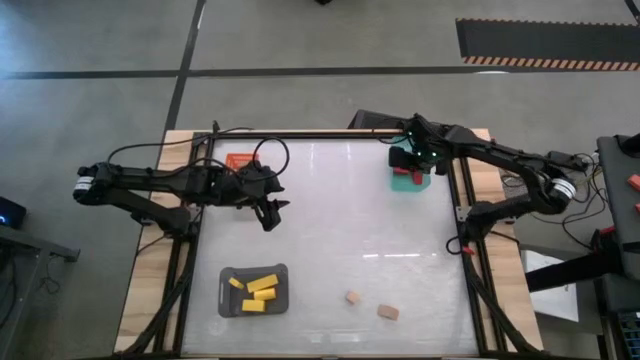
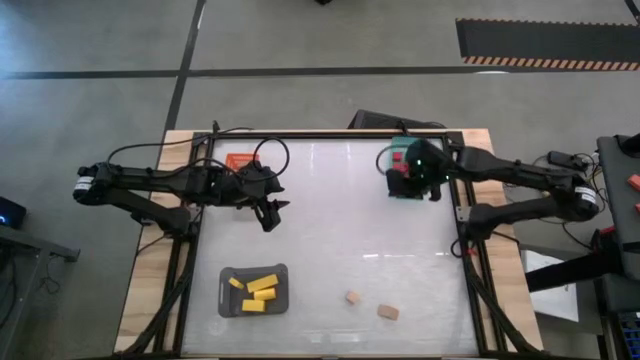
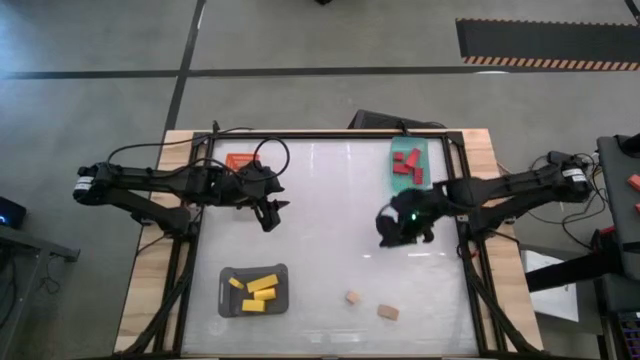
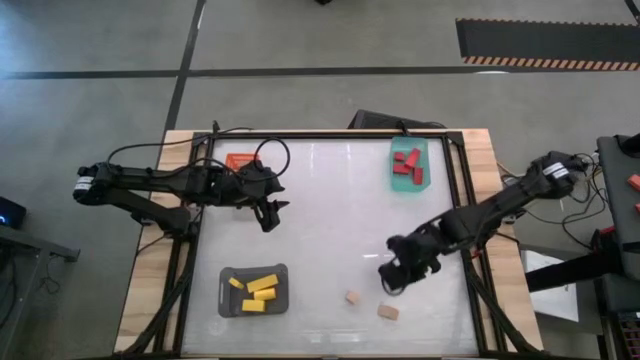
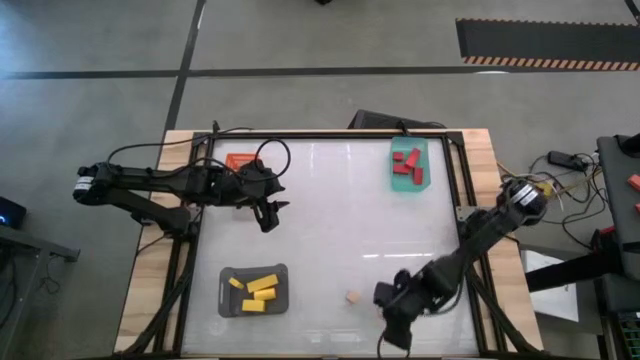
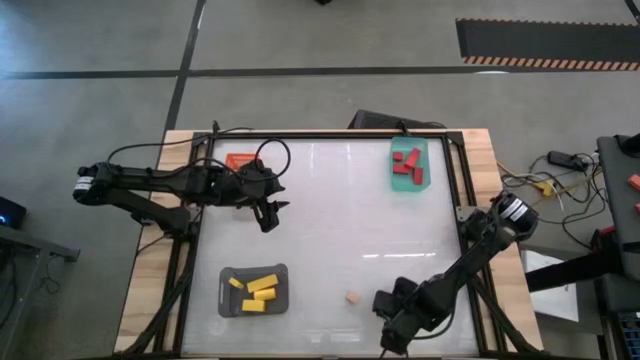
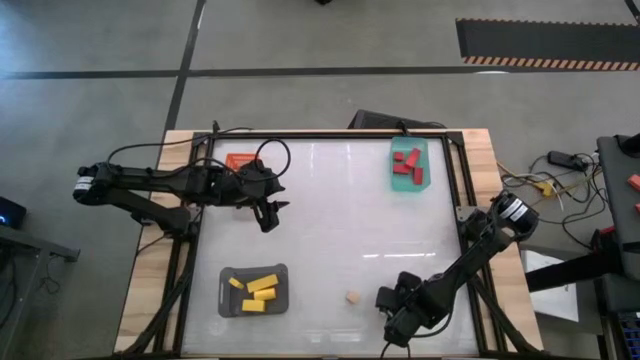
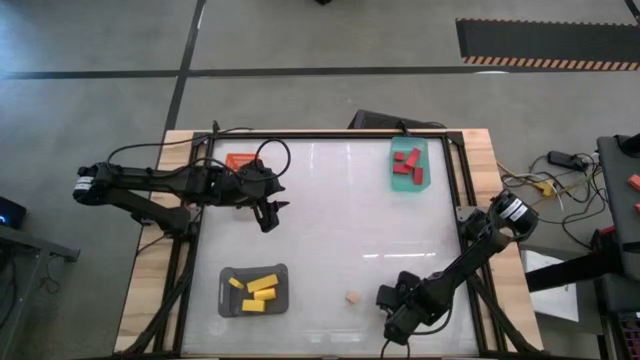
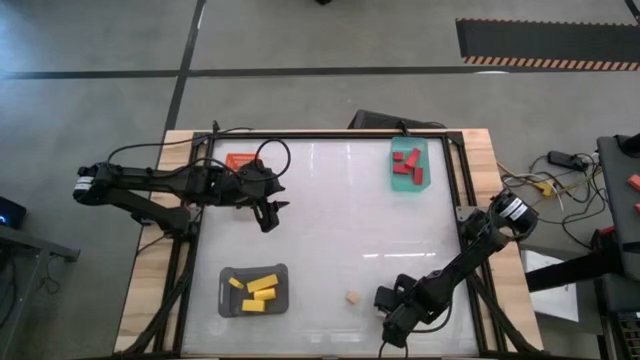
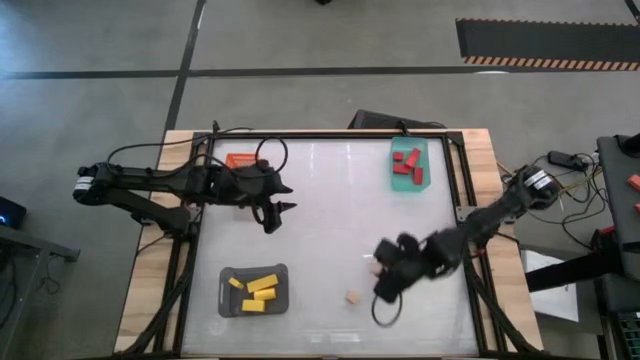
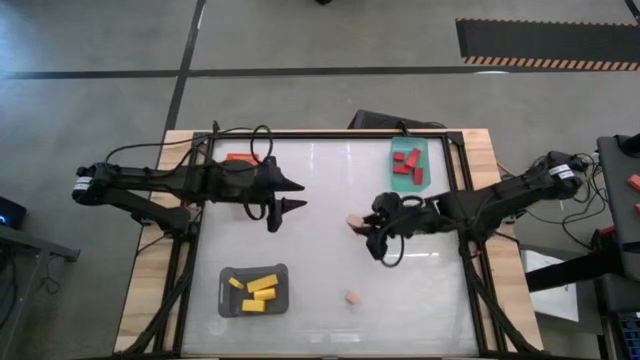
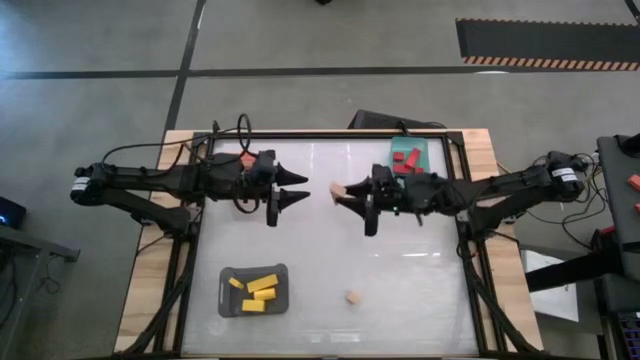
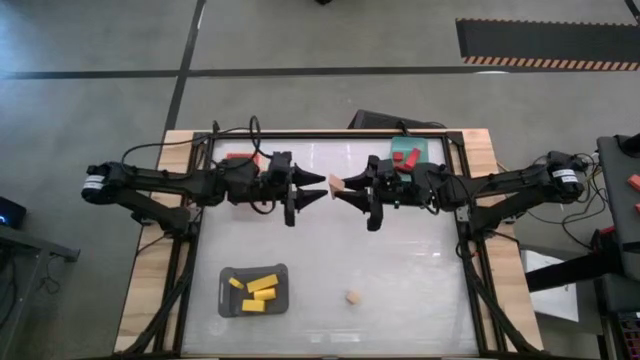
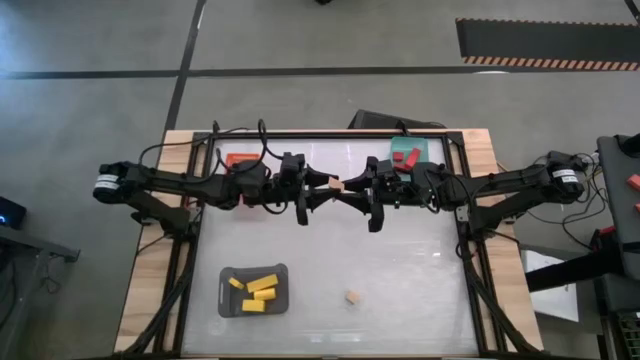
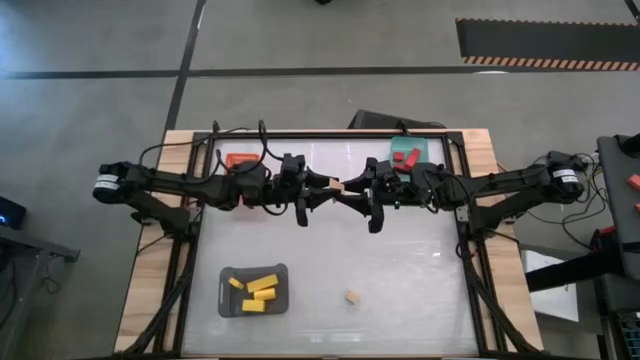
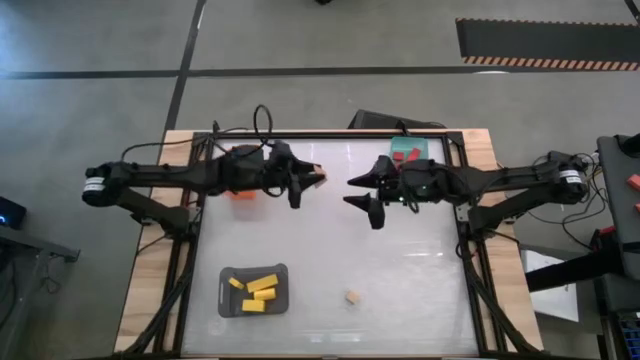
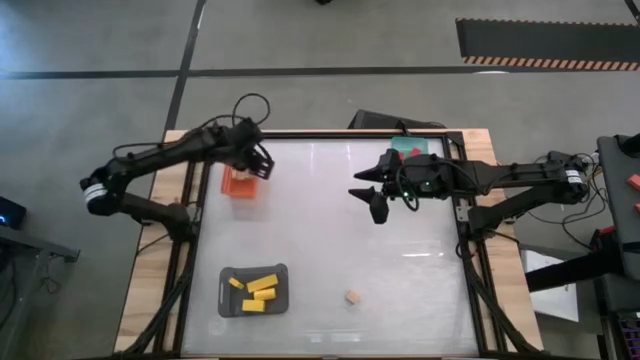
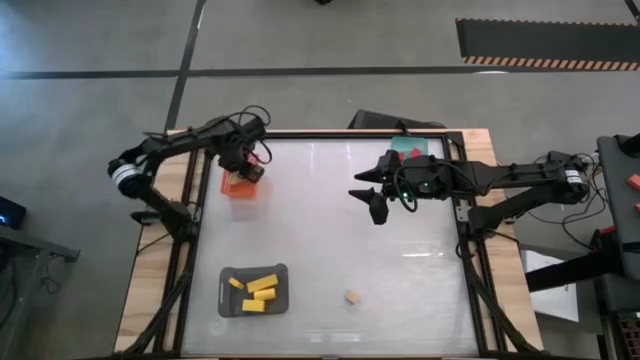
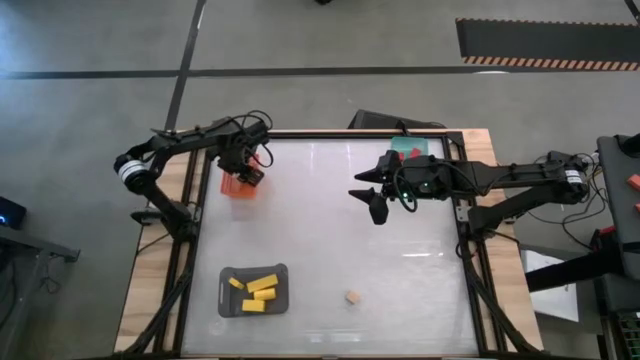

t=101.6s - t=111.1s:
Task: Sort & place blocks by color
Put the brown block into the orange bin

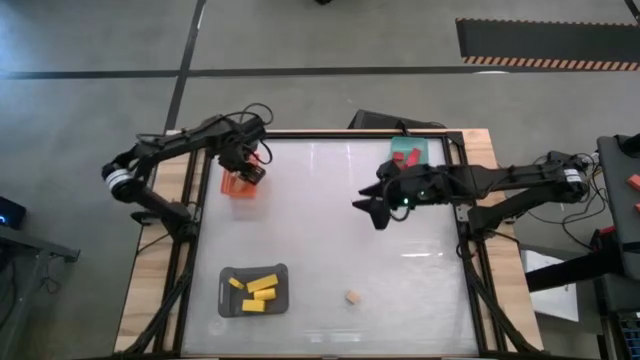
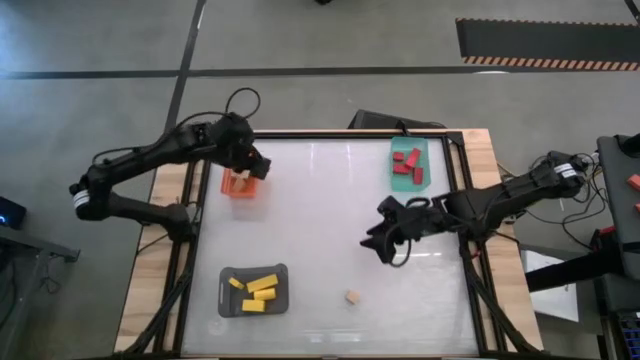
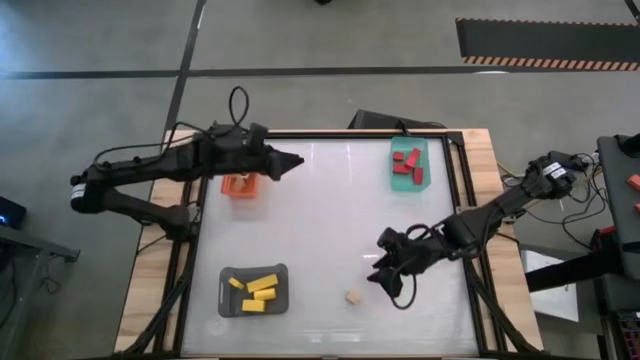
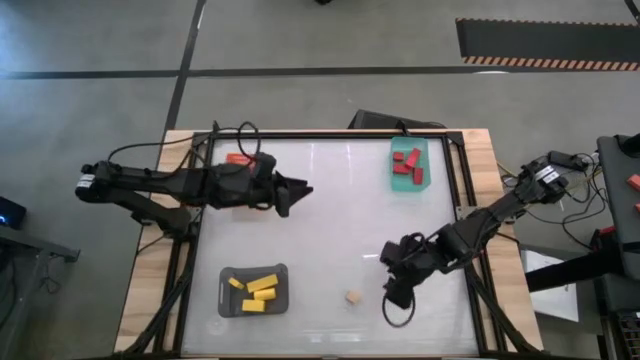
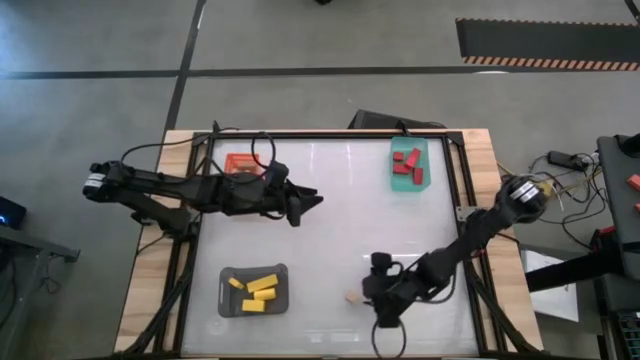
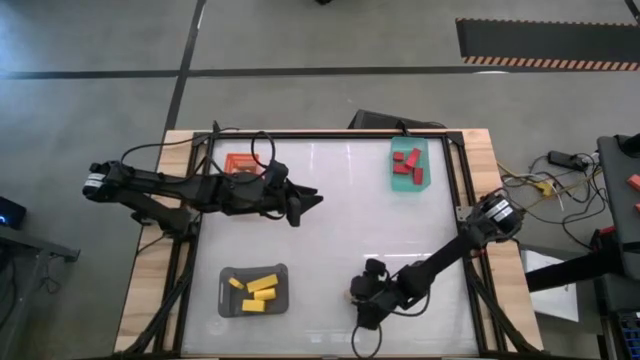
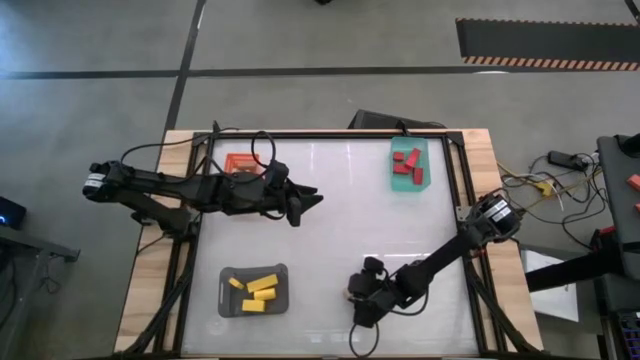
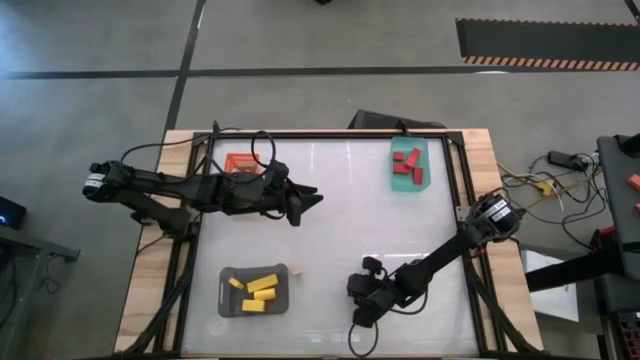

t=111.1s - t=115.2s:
Put the brown block into the orange bin

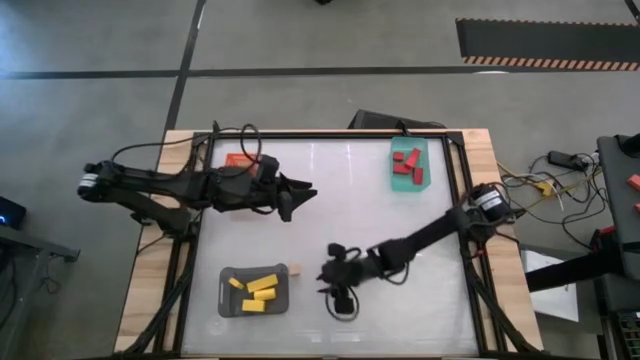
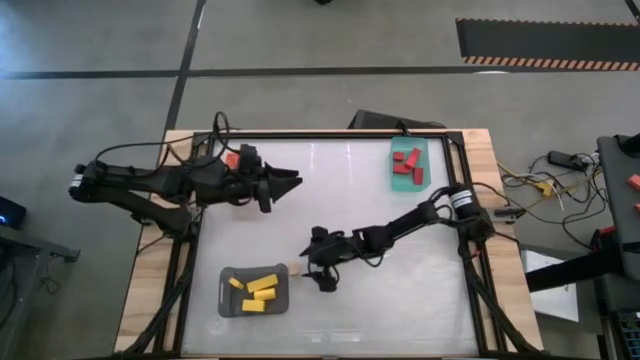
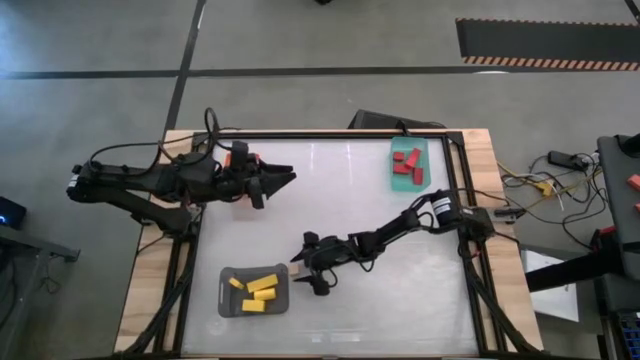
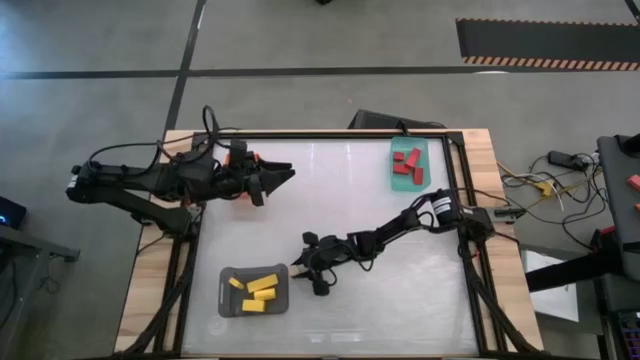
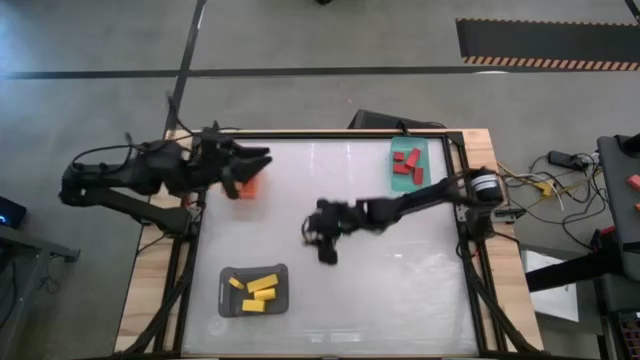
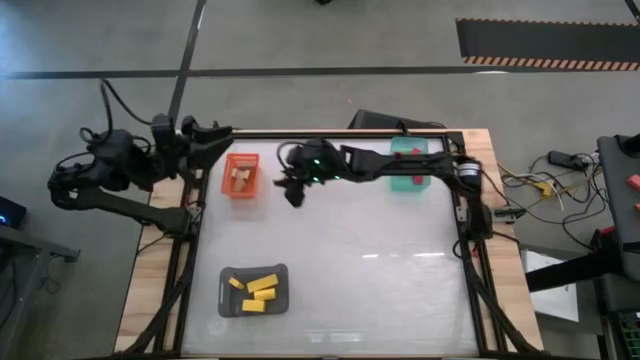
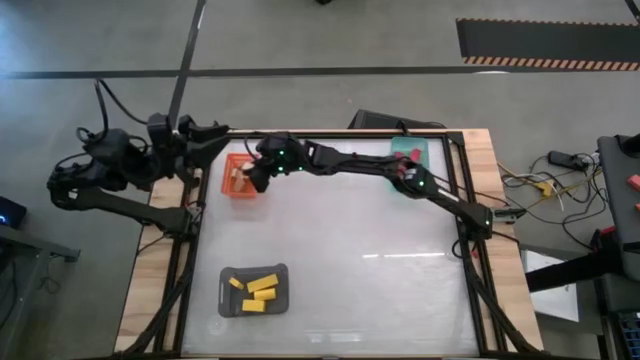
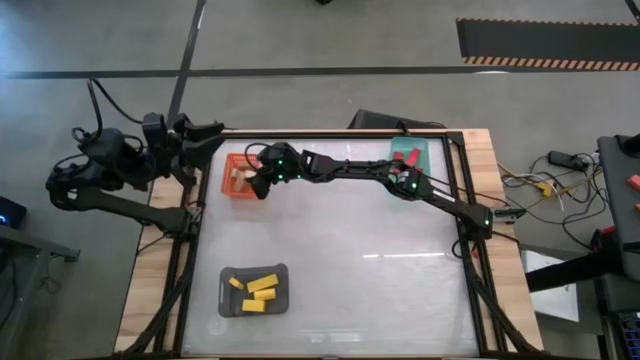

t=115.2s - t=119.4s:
Put the brown block into the orange bin

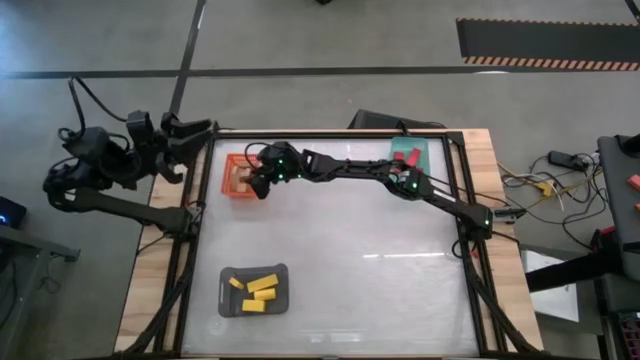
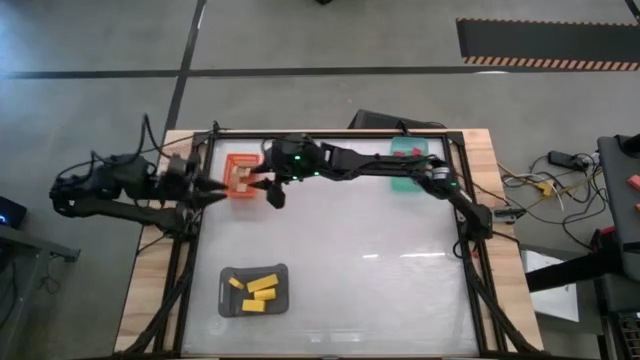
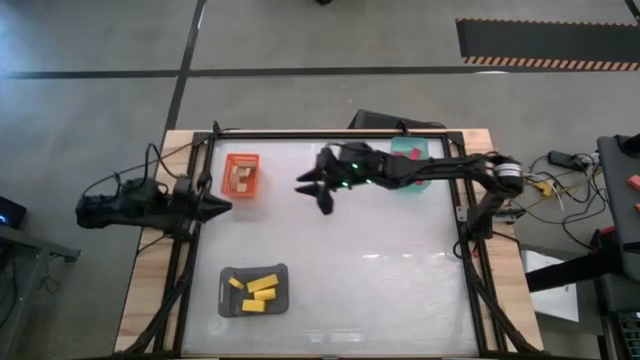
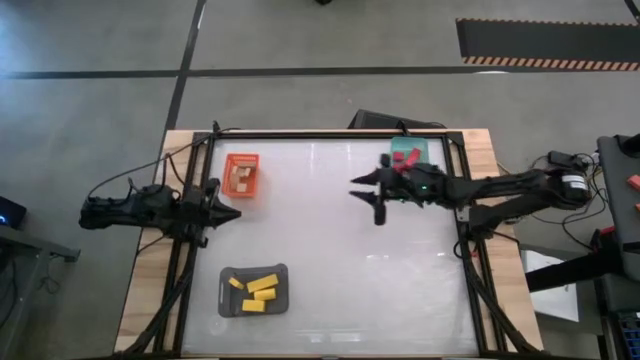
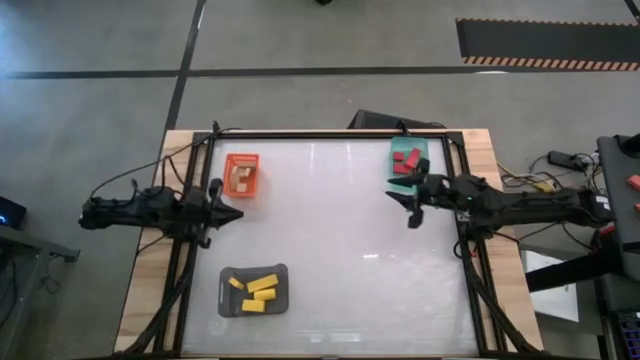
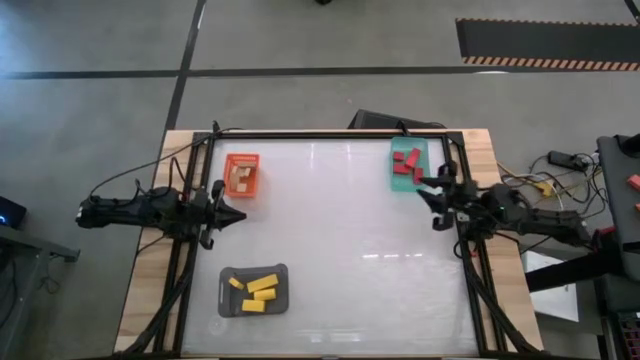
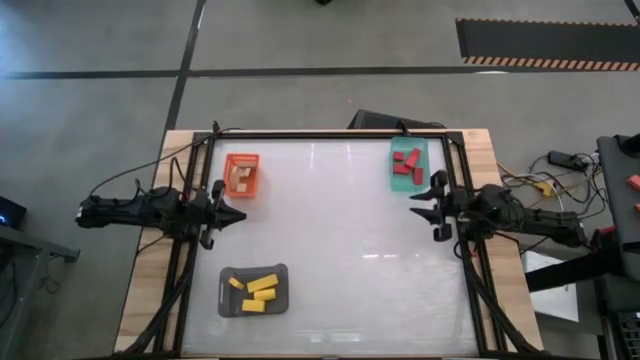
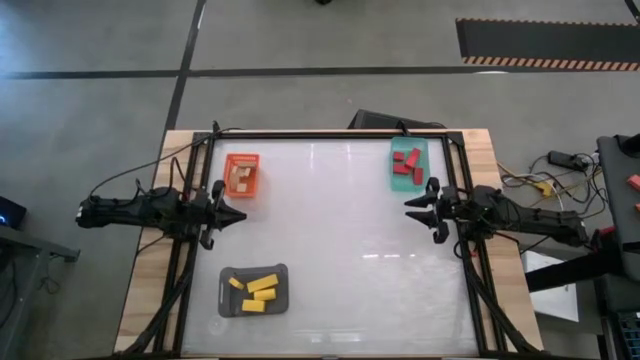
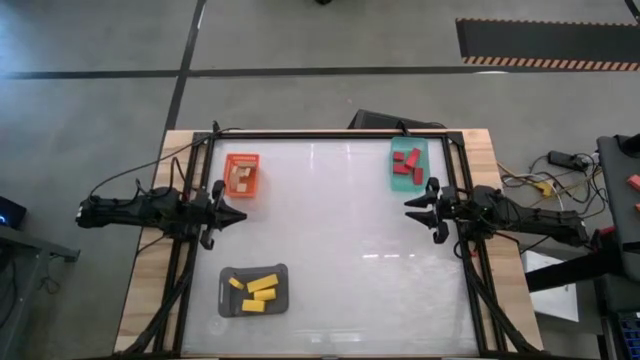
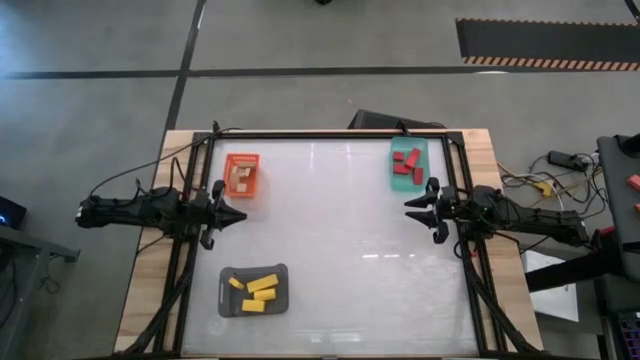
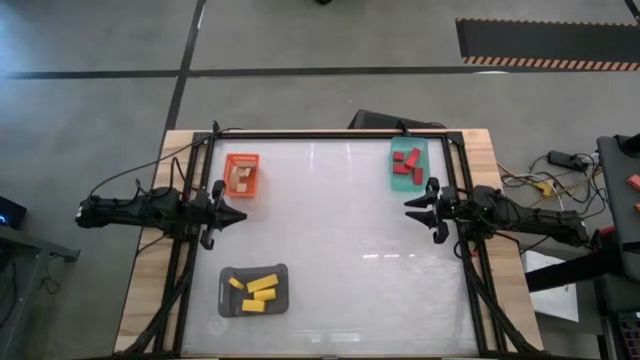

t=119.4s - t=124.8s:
Return to Home Position
